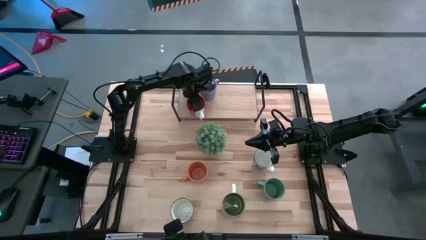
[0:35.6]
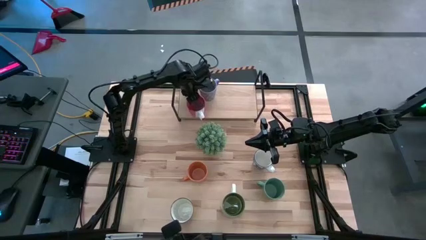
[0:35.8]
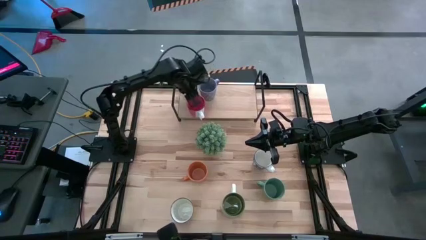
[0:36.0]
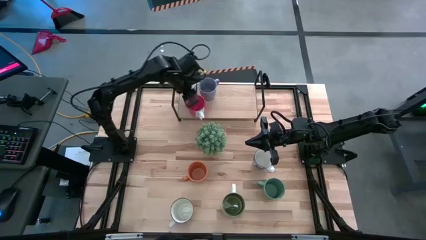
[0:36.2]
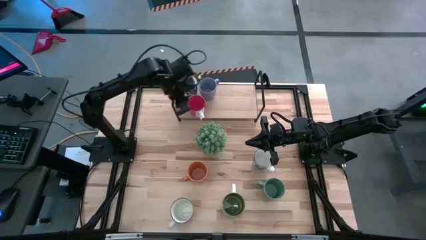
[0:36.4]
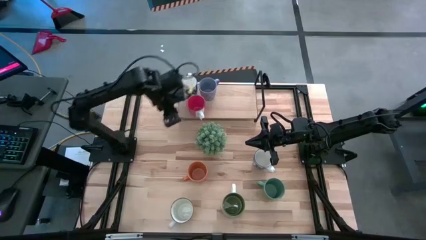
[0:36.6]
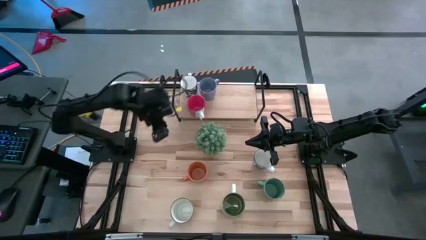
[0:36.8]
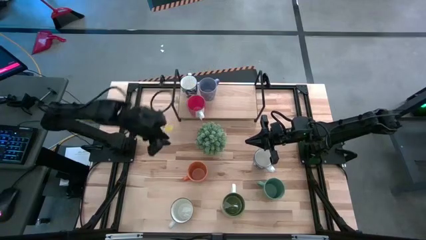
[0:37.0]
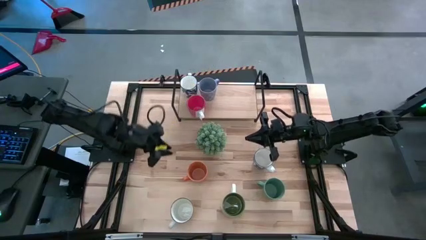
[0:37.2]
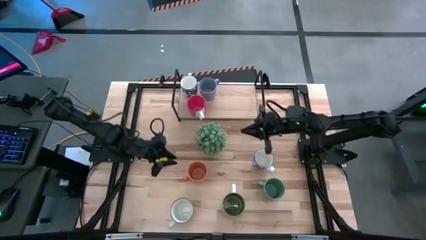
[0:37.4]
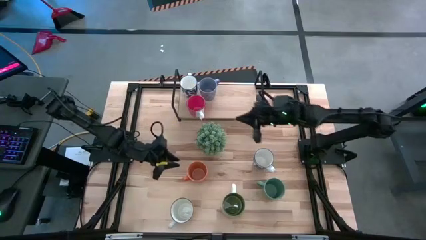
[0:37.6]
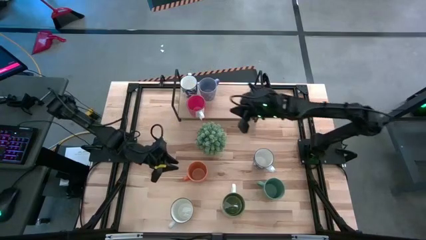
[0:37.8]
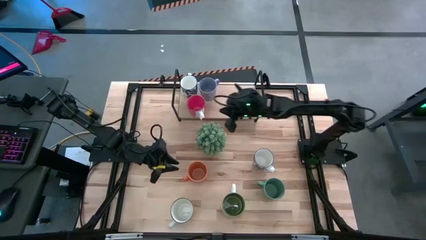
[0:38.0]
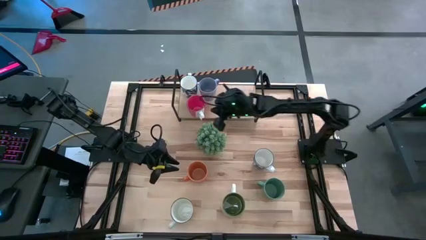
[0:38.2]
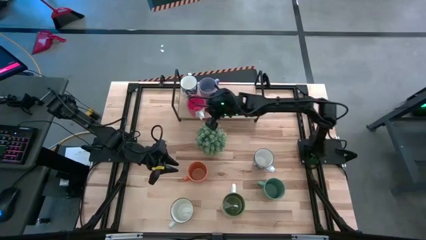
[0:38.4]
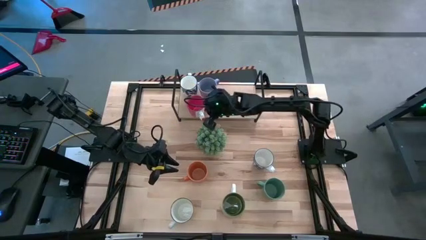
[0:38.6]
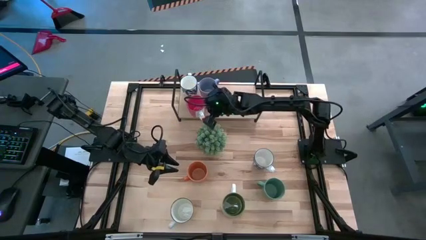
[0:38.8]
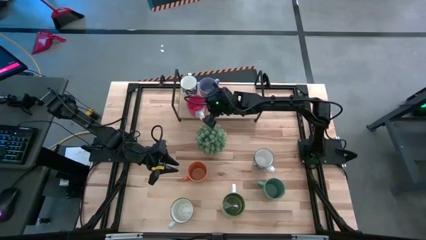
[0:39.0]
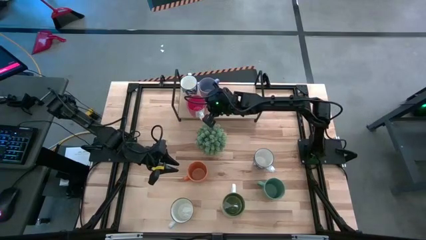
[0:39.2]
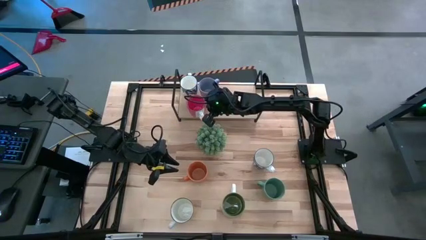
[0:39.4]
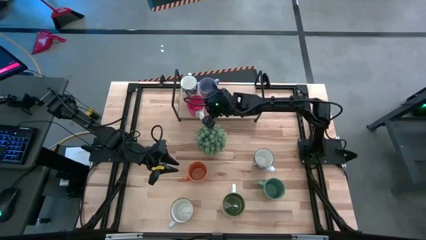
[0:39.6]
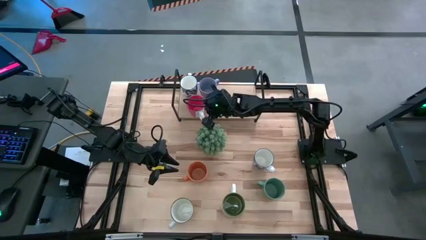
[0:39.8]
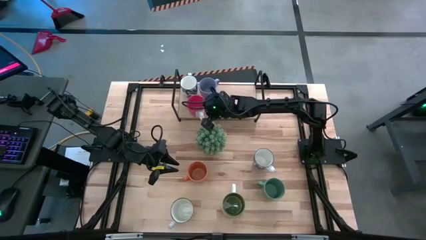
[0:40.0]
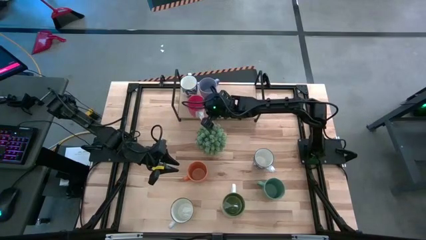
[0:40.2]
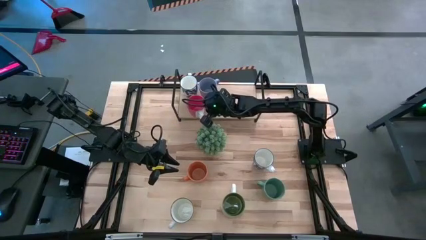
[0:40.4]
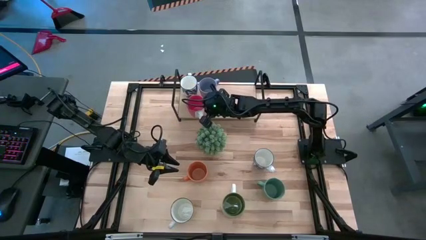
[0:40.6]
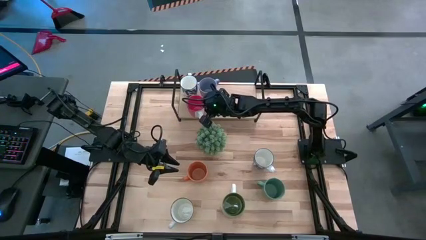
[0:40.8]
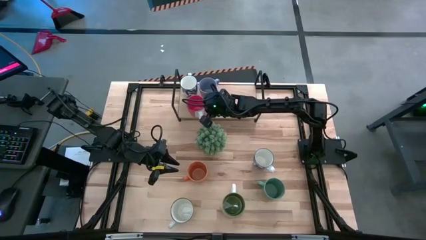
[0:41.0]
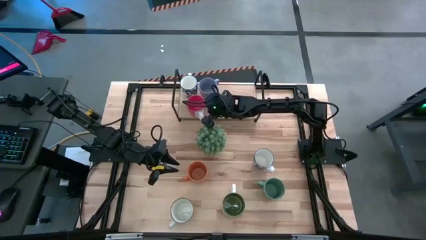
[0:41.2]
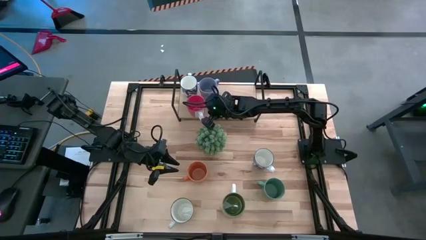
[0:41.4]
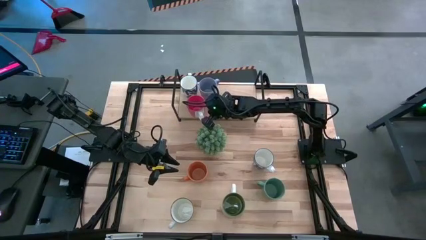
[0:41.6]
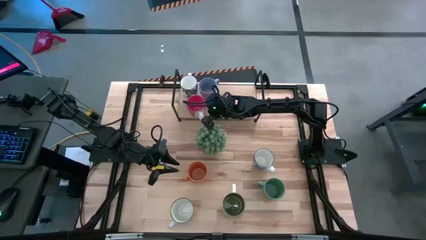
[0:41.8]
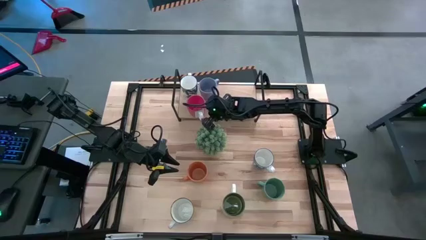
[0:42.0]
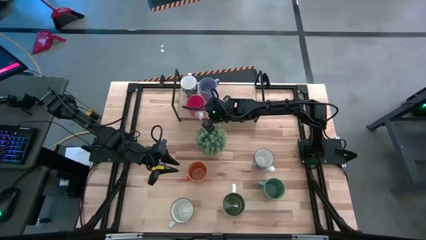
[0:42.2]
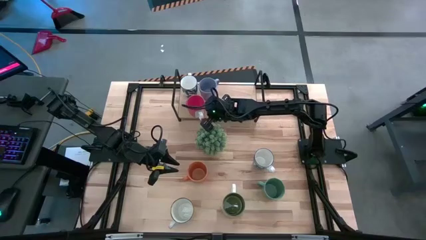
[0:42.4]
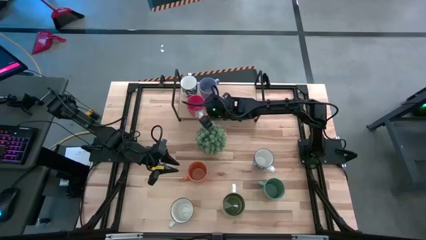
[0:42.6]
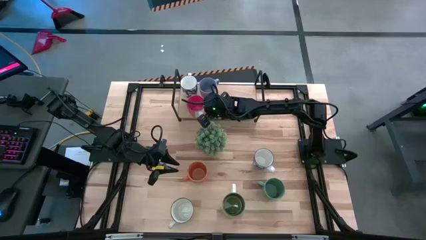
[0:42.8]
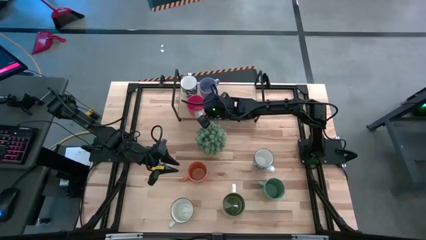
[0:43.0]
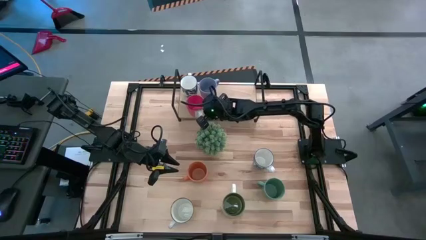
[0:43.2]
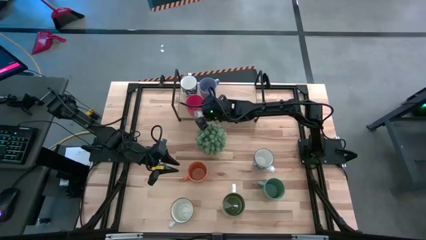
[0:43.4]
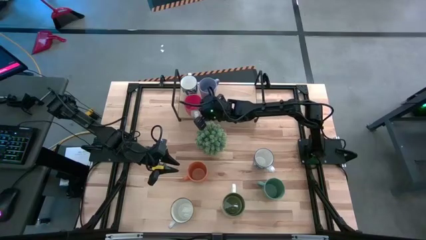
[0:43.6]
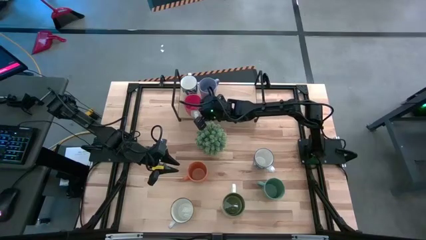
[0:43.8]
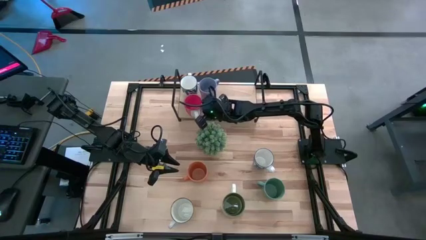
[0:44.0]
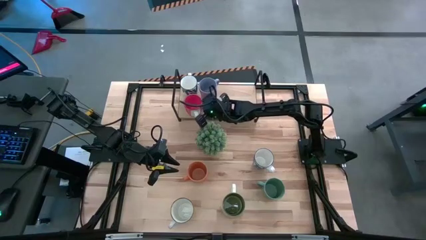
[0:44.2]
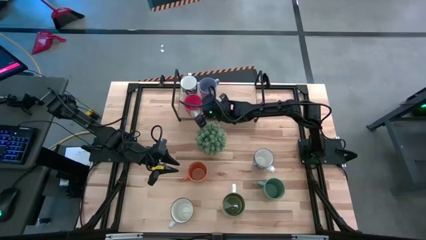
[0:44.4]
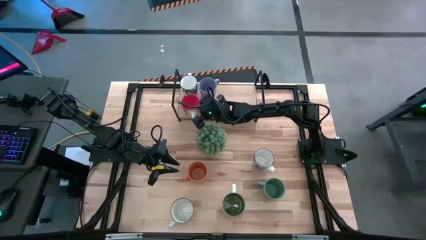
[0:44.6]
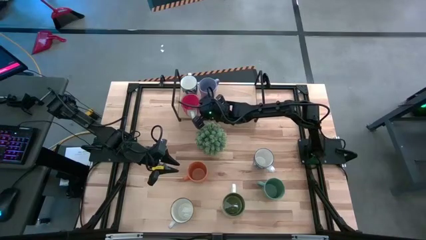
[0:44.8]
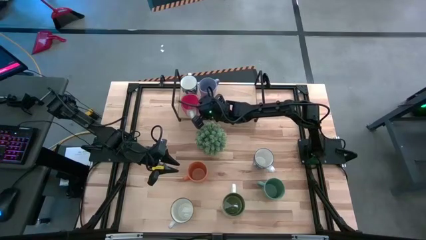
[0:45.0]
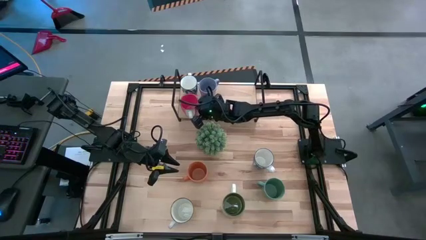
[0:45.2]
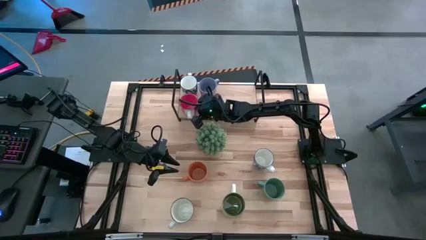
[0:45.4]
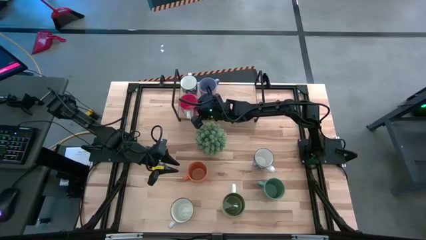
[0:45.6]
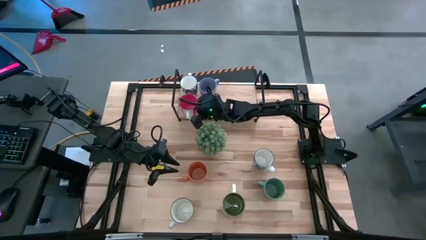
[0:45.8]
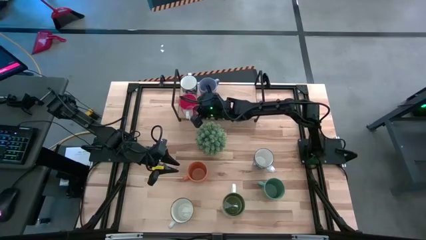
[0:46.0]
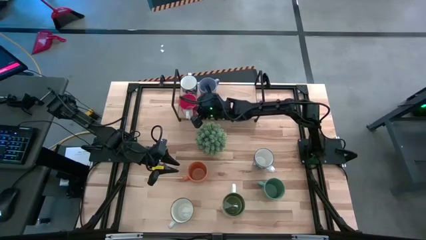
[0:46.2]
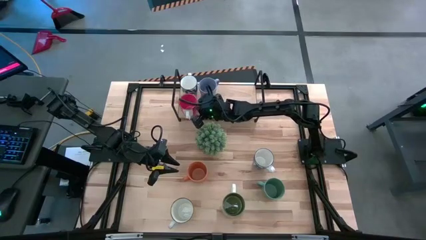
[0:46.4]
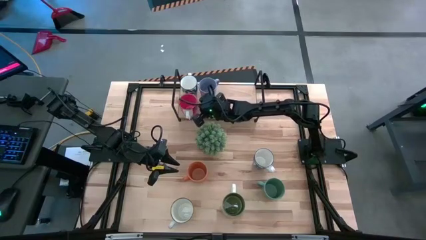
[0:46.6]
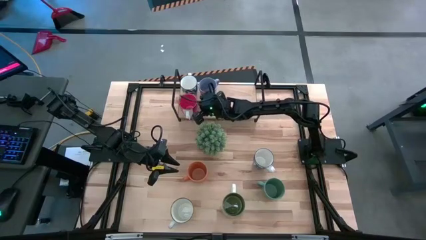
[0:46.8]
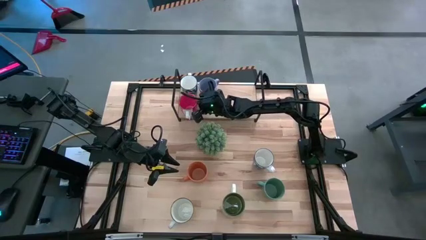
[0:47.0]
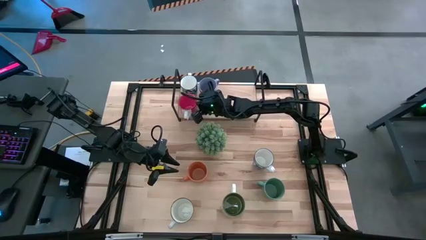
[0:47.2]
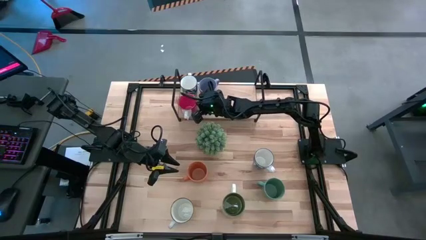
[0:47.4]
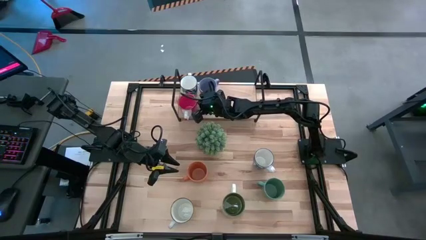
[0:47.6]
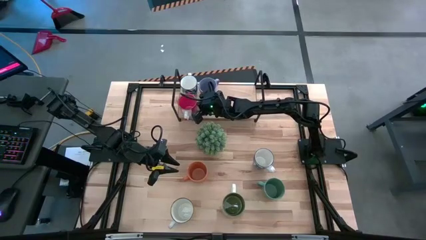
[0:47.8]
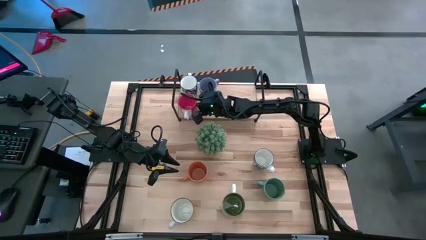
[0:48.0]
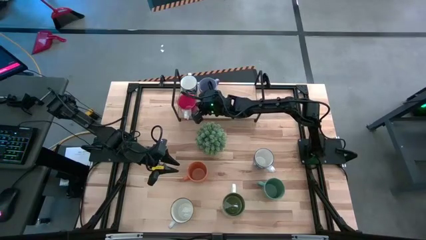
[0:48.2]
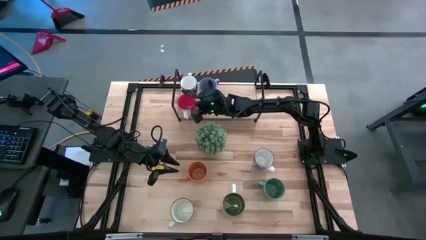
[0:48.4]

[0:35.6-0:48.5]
Task: Place coffee mugs
Put the red mug on the shelf

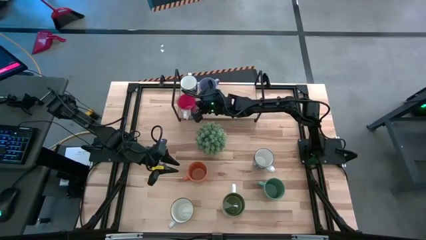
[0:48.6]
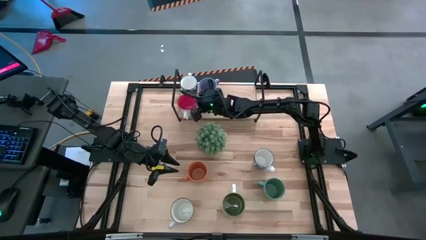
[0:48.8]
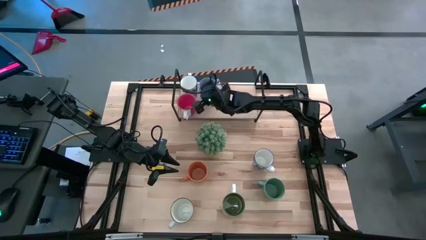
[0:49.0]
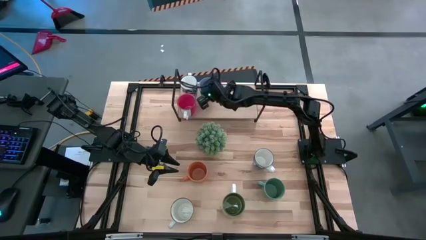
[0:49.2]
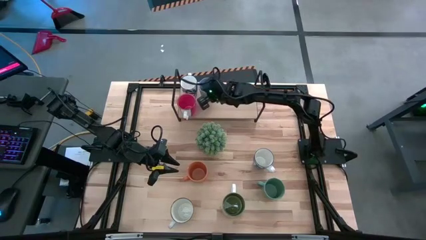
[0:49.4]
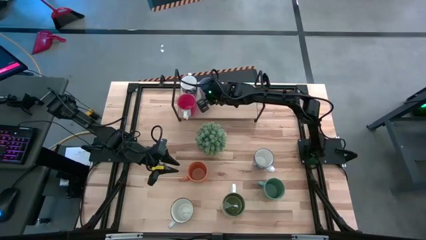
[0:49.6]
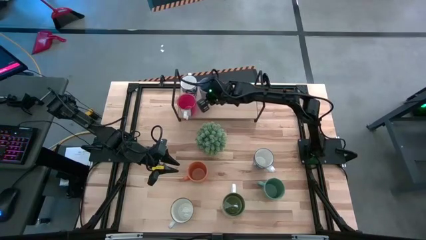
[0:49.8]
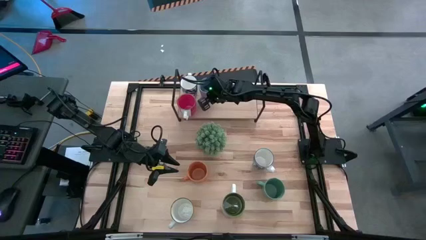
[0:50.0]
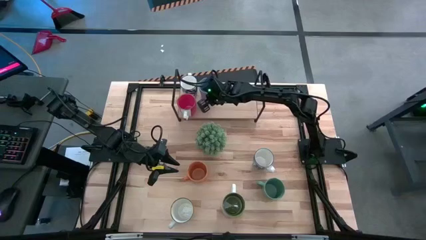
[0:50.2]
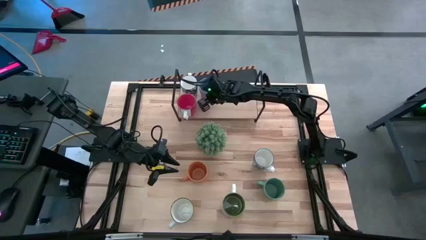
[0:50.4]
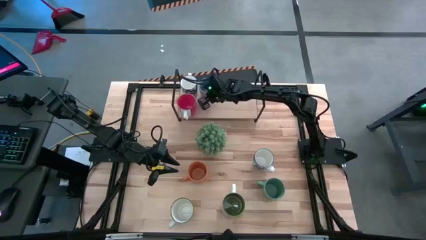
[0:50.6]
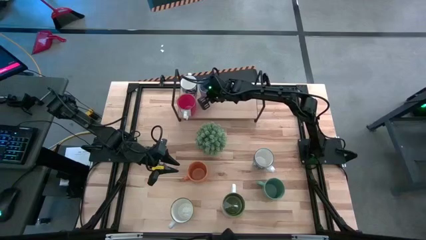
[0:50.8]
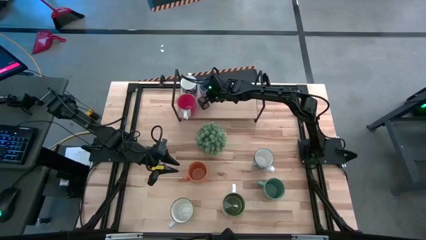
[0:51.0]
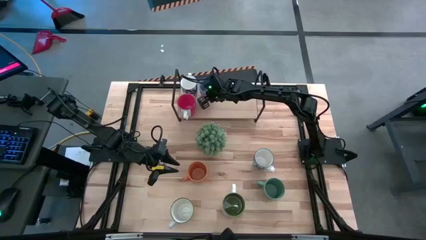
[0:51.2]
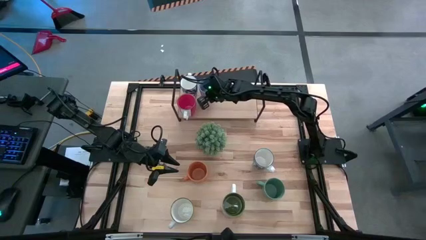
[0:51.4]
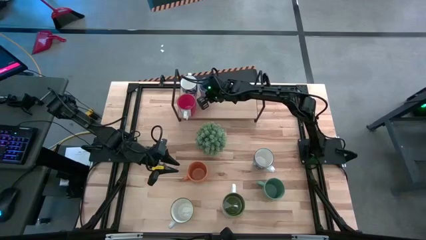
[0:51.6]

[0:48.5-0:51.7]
Adjust the blue mug on the shelf
